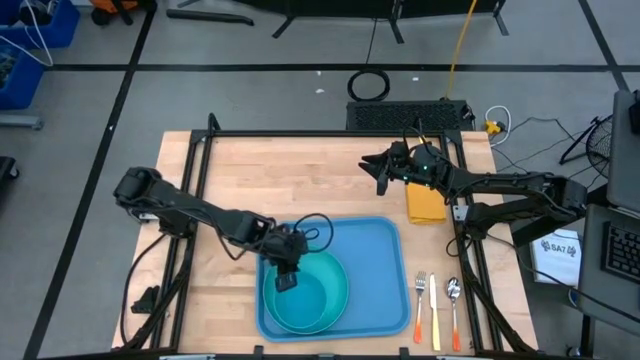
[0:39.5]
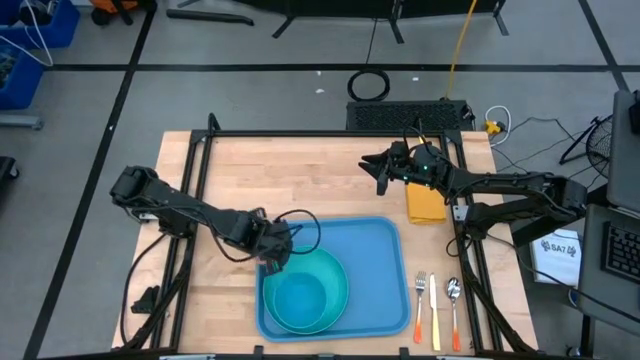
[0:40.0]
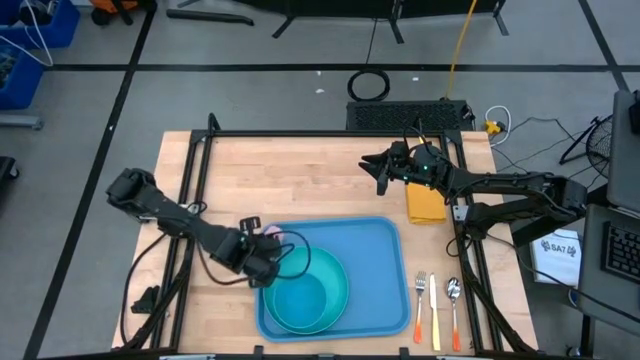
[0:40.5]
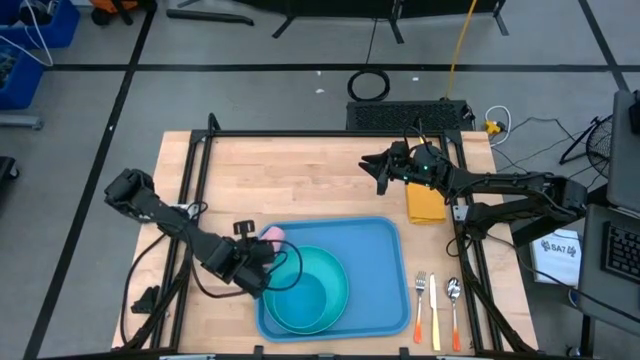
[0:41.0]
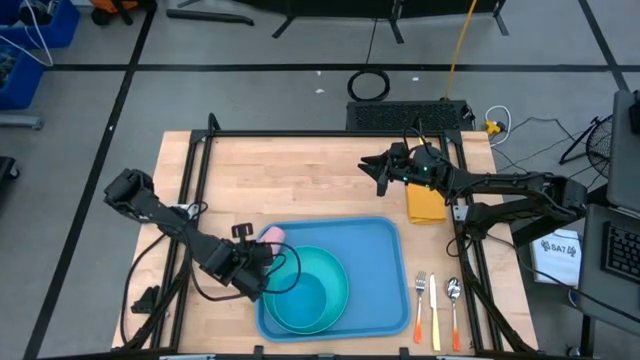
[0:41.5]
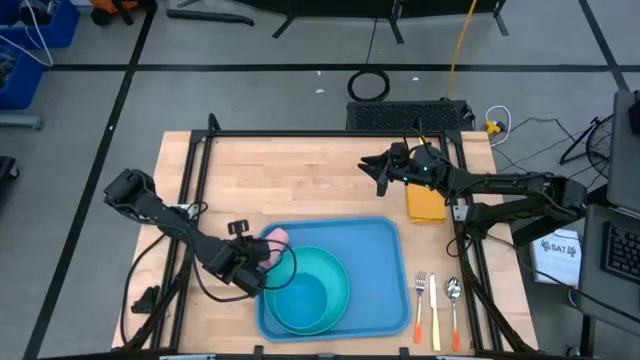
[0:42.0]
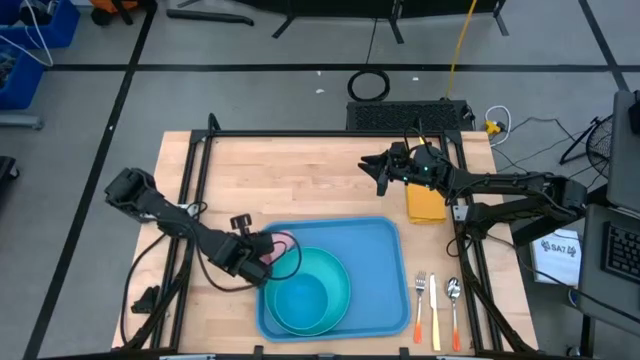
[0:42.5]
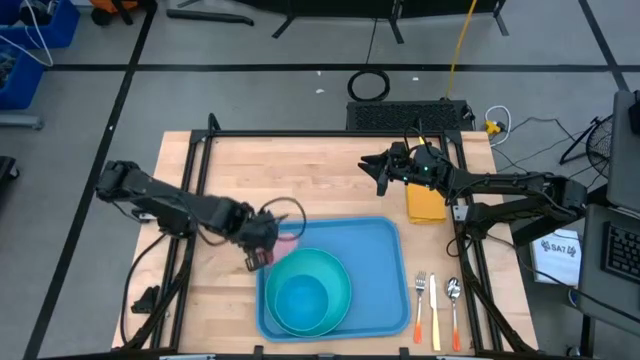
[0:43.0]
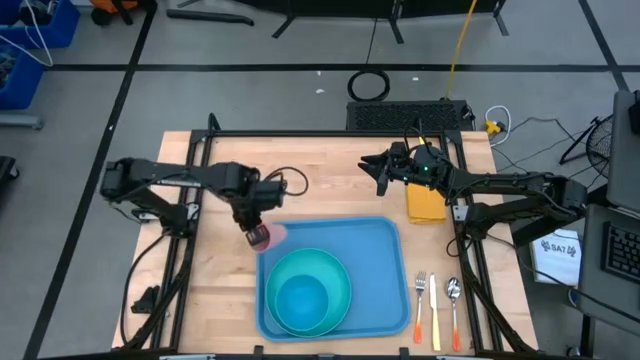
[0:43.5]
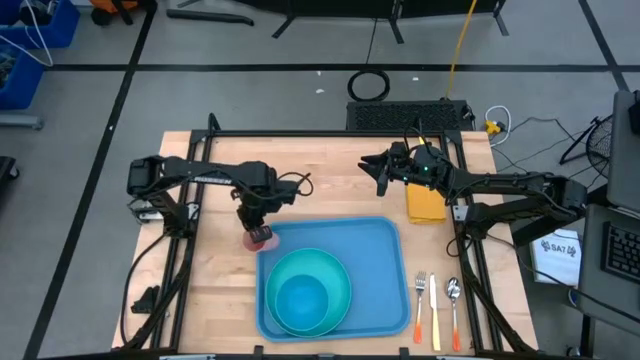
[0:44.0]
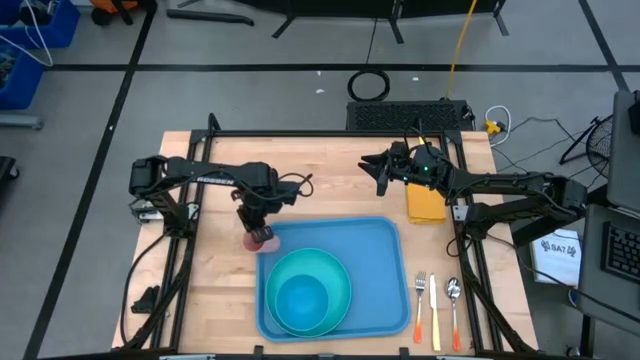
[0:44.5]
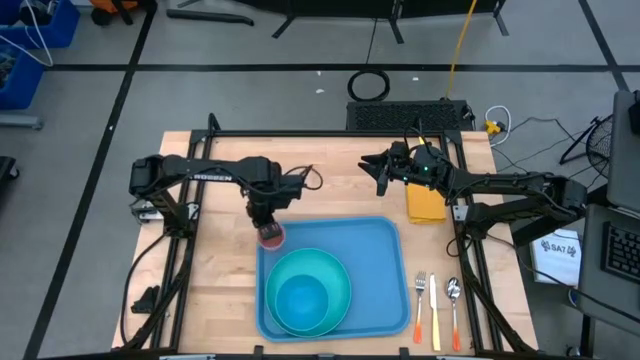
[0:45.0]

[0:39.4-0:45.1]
Task: Set up tray
Adjust the pink cup on the serving tray

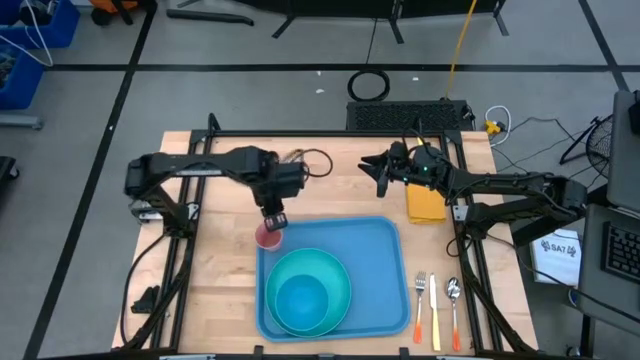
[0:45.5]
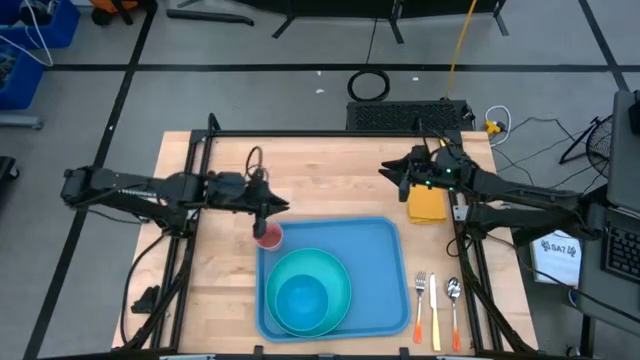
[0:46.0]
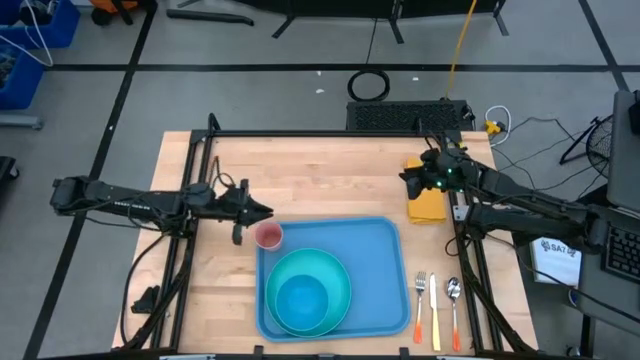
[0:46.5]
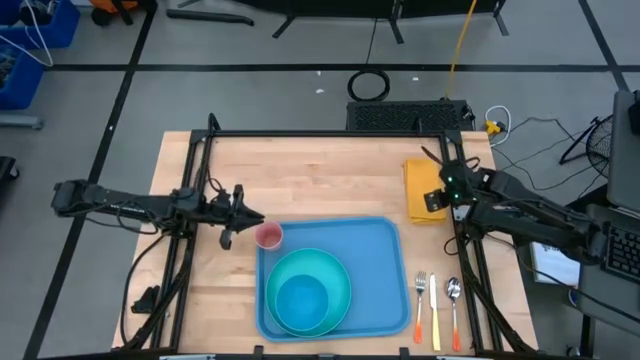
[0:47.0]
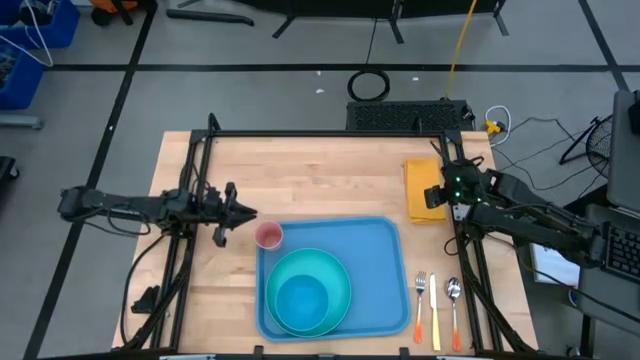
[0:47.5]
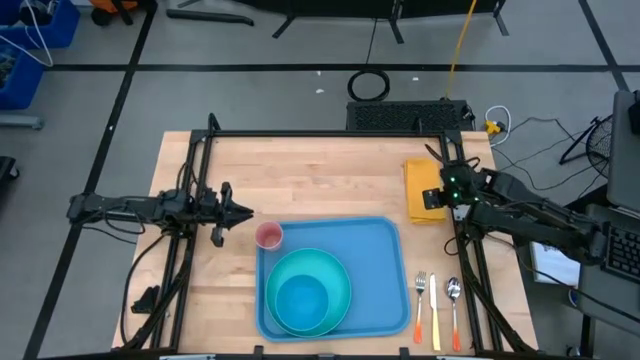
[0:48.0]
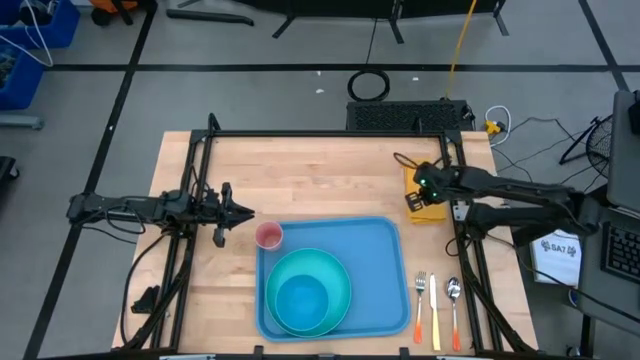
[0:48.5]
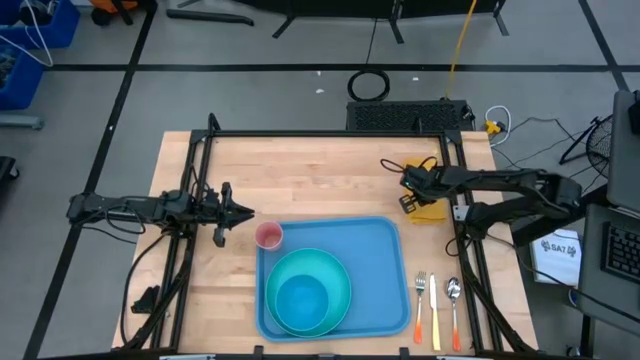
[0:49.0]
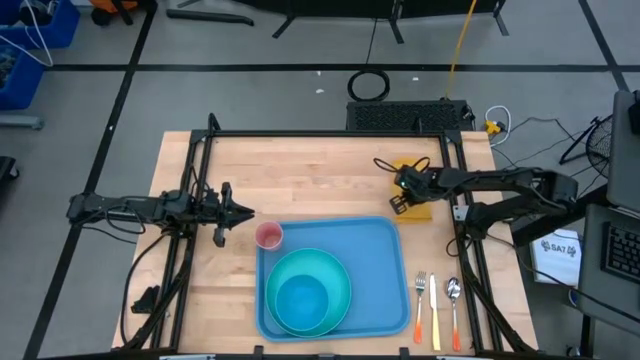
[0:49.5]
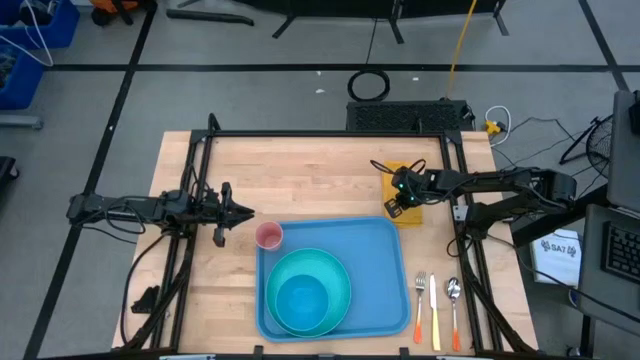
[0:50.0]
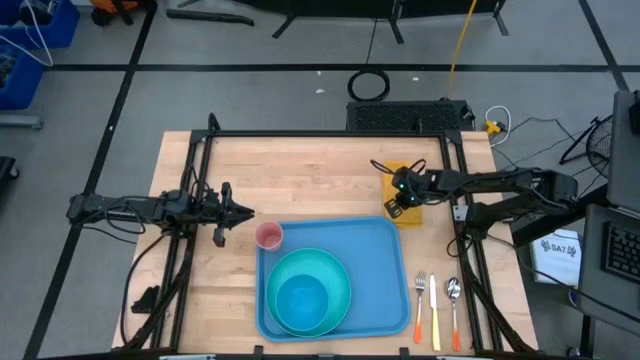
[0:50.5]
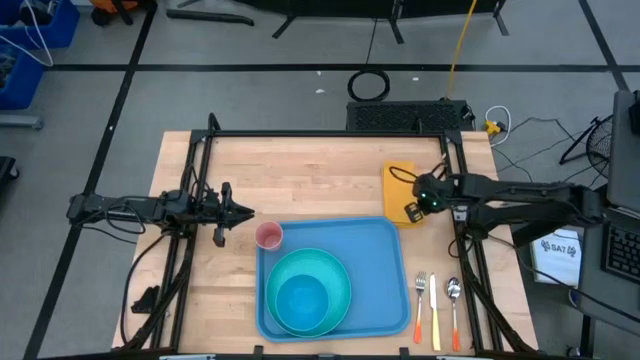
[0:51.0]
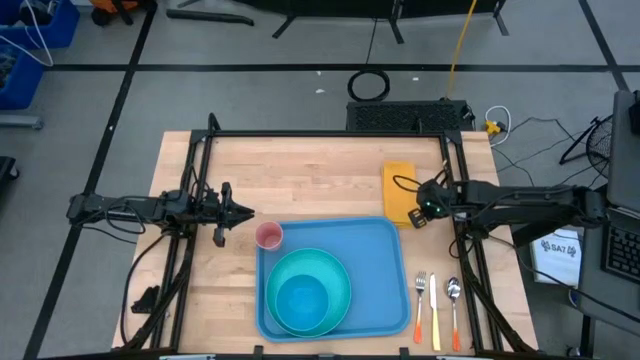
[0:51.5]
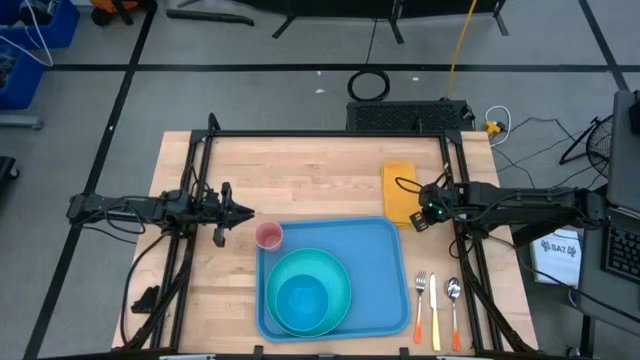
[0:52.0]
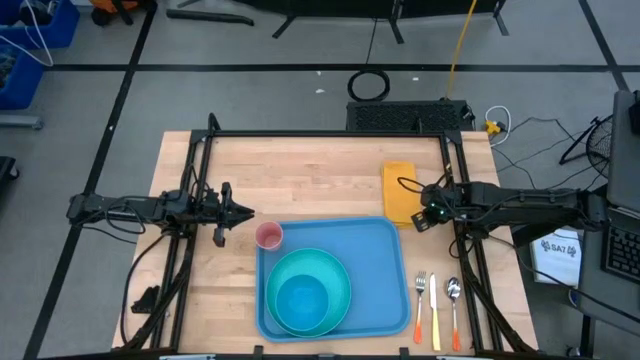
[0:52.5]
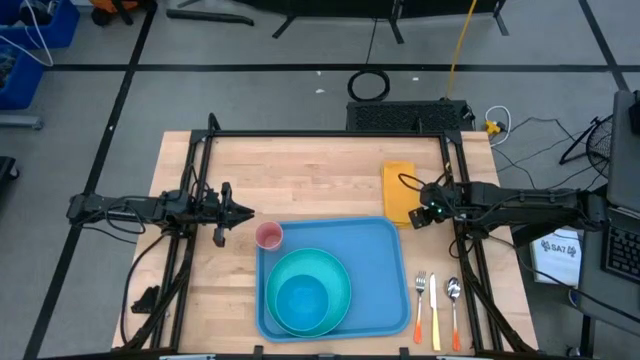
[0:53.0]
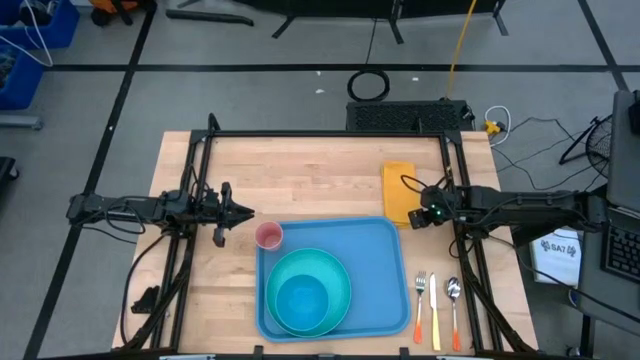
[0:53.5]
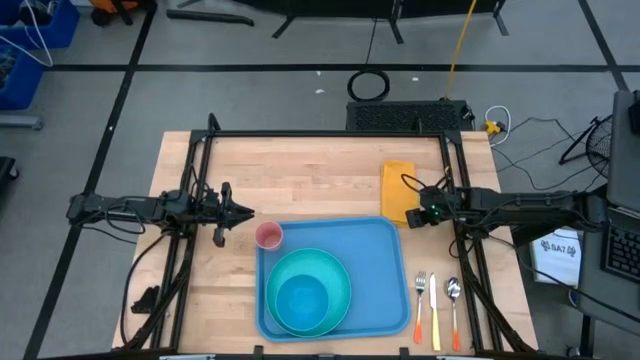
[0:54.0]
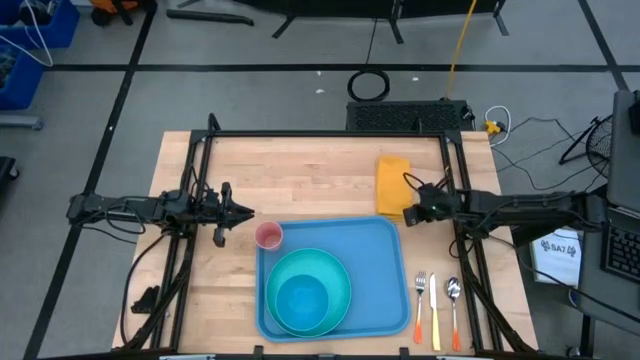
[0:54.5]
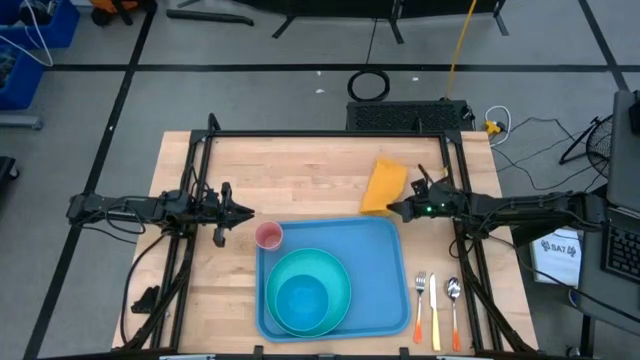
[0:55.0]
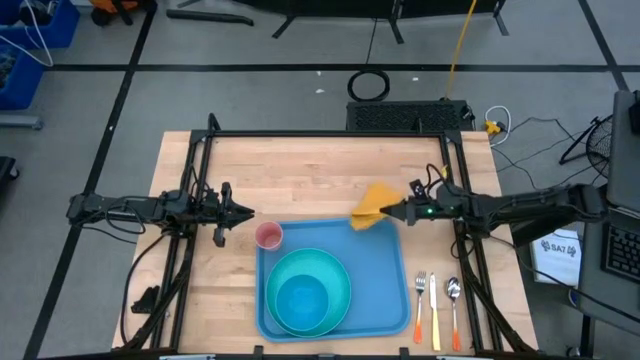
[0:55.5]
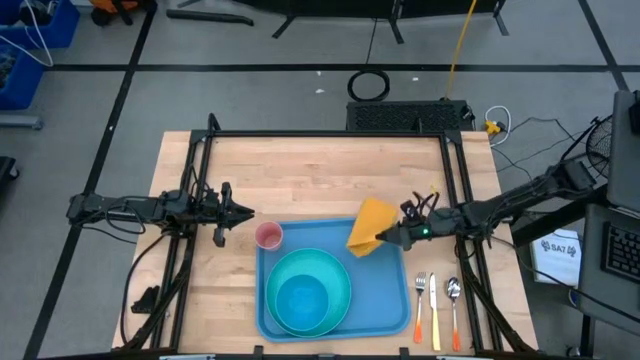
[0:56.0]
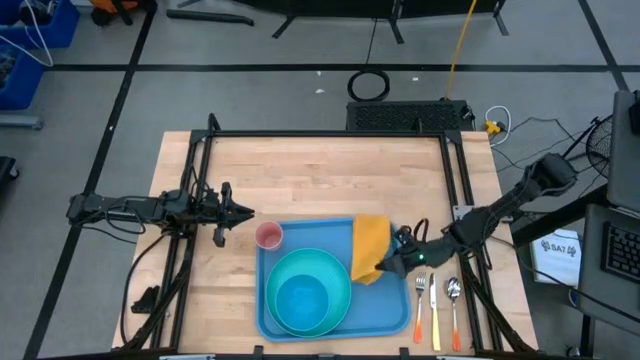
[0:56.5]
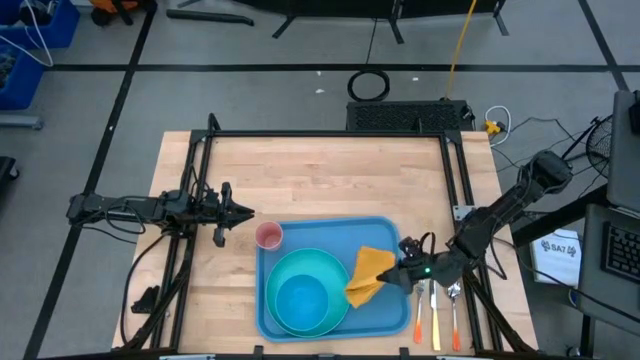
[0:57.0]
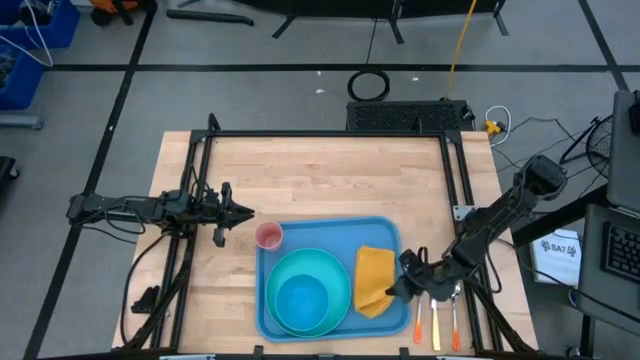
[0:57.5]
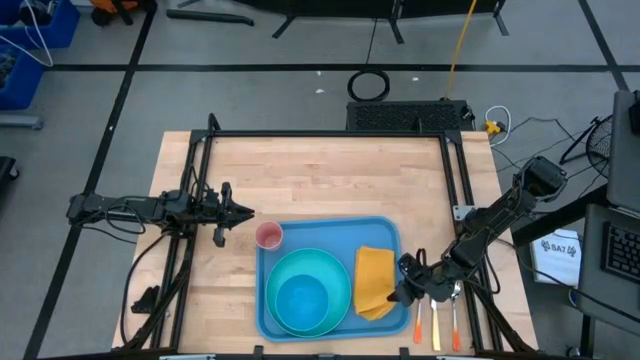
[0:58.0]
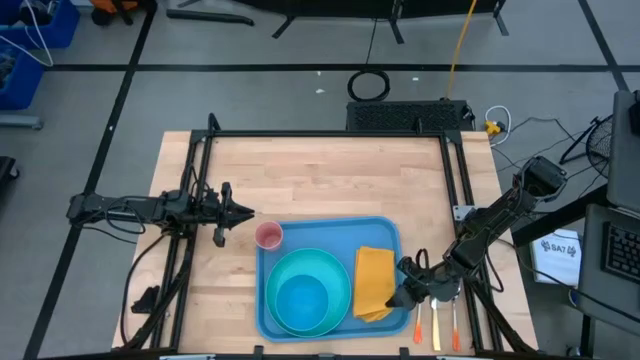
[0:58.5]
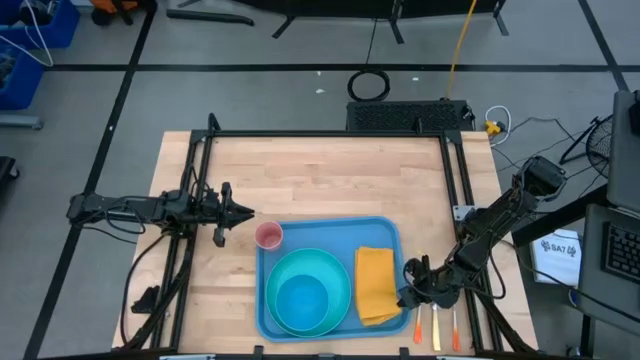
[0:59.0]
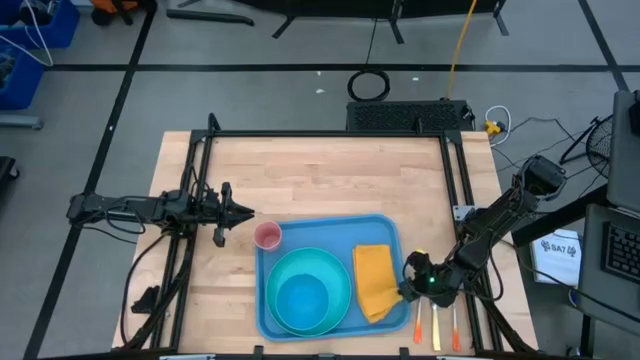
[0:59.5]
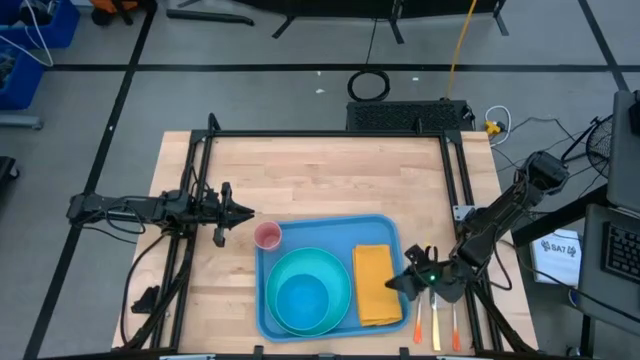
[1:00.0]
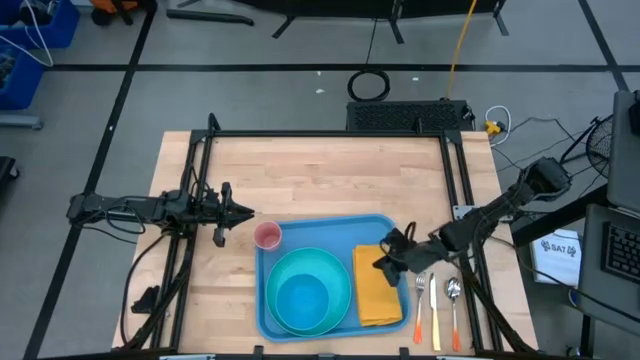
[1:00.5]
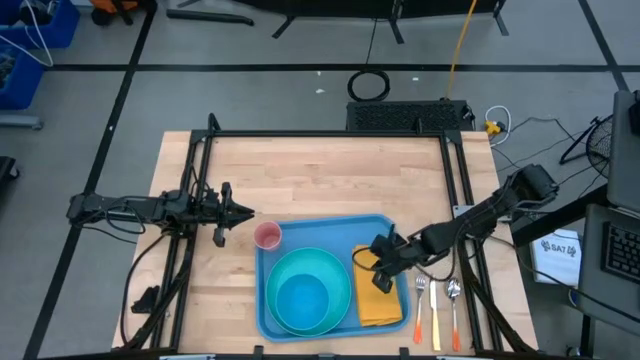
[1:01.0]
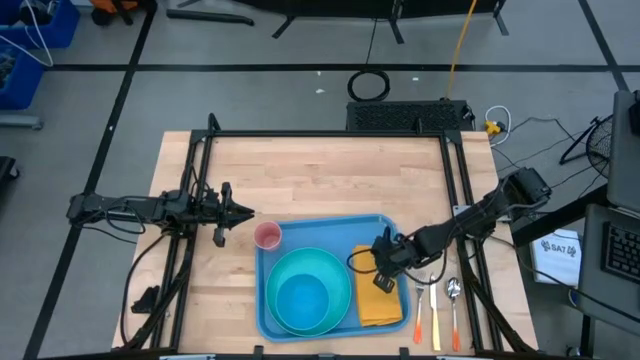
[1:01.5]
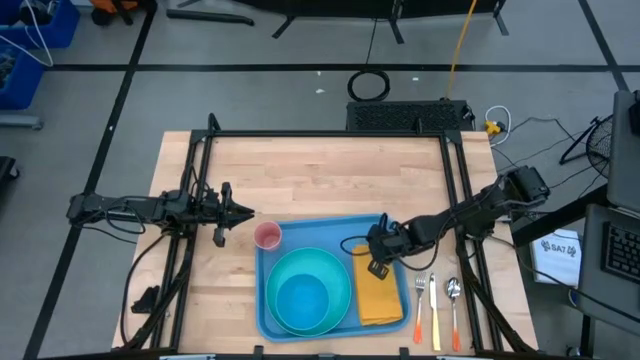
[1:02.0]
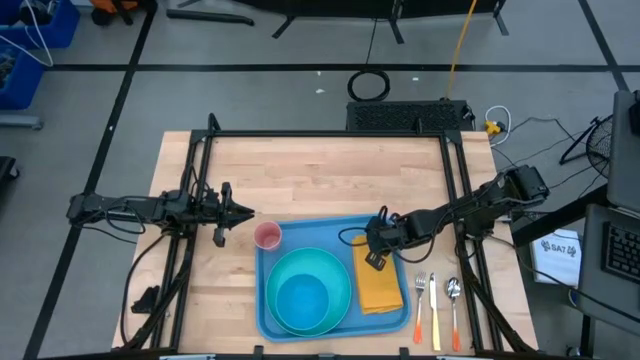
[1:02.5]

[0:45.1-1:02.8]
Put the yellow napkin on the serving tray to the right of the green plate
